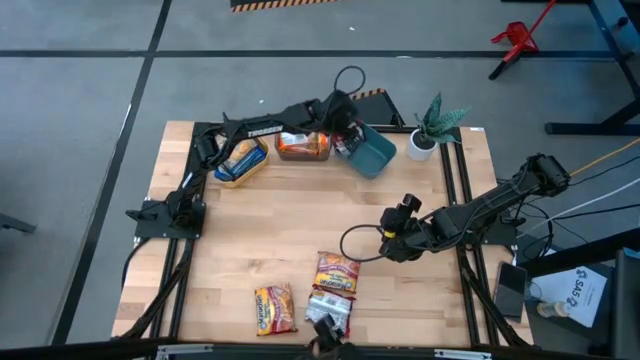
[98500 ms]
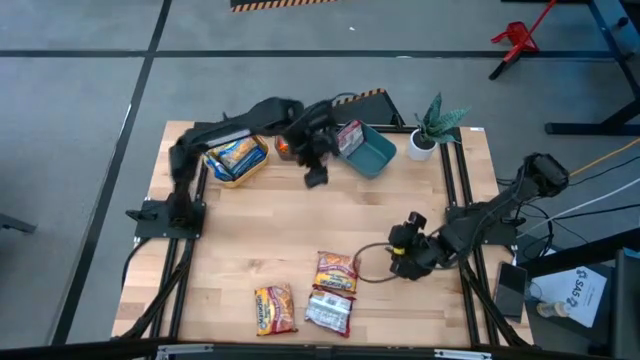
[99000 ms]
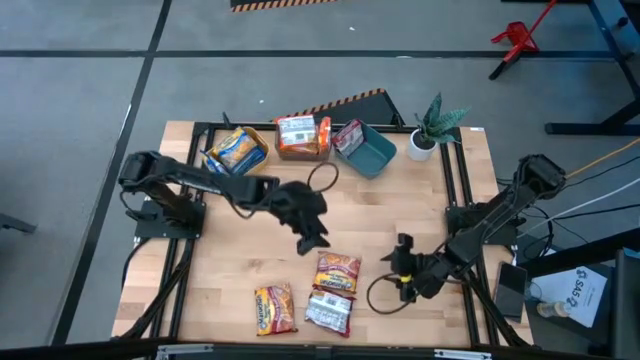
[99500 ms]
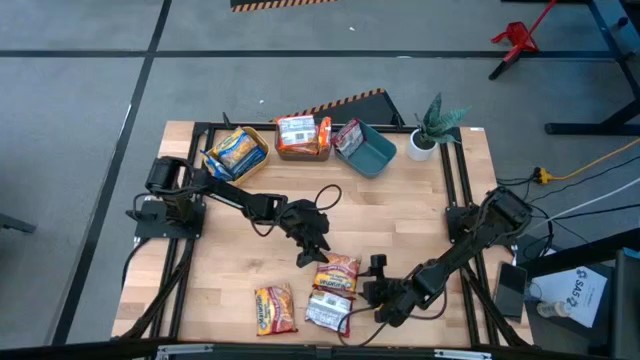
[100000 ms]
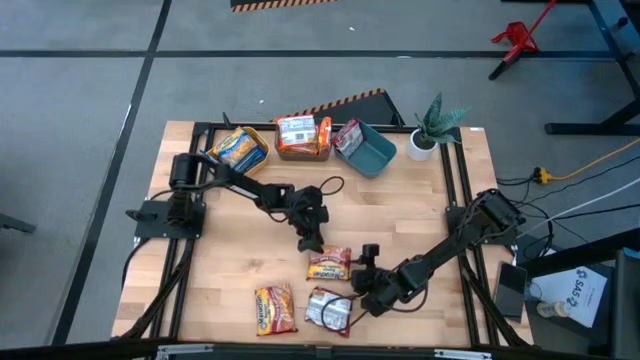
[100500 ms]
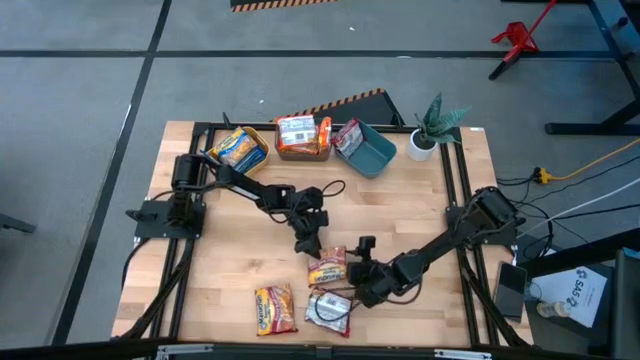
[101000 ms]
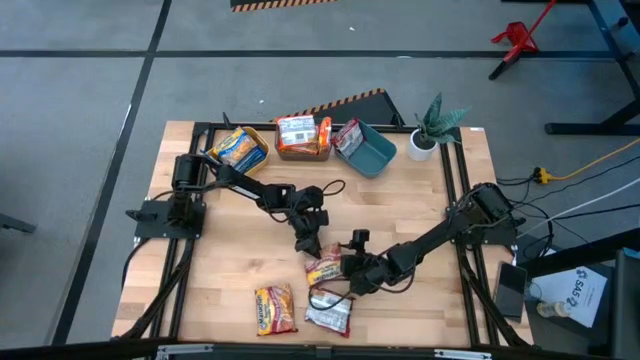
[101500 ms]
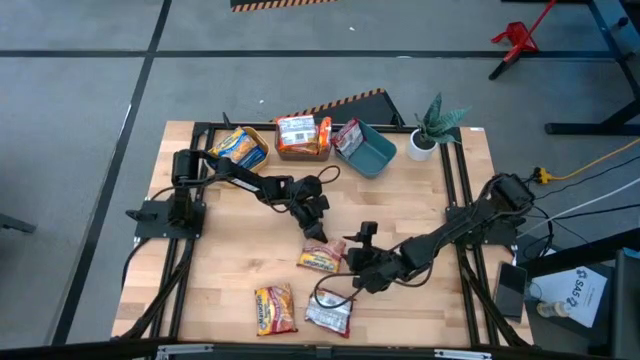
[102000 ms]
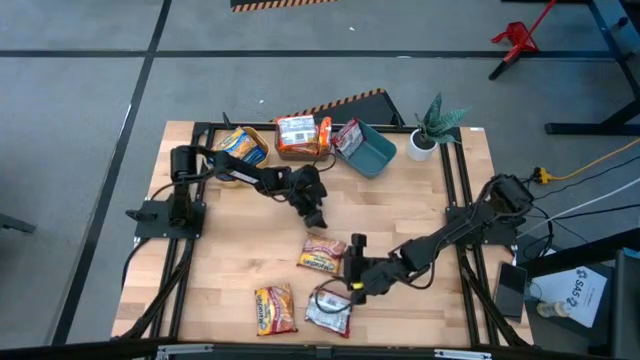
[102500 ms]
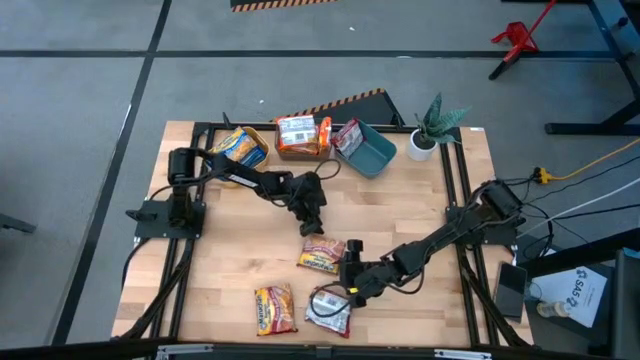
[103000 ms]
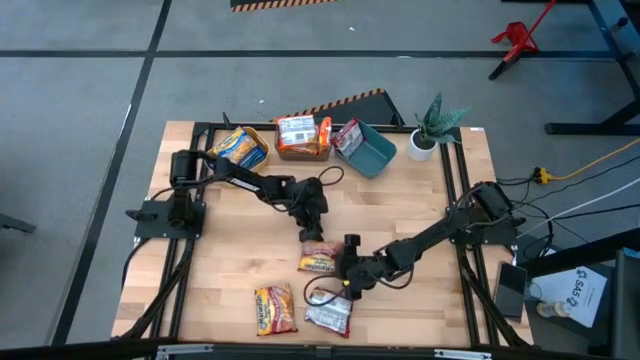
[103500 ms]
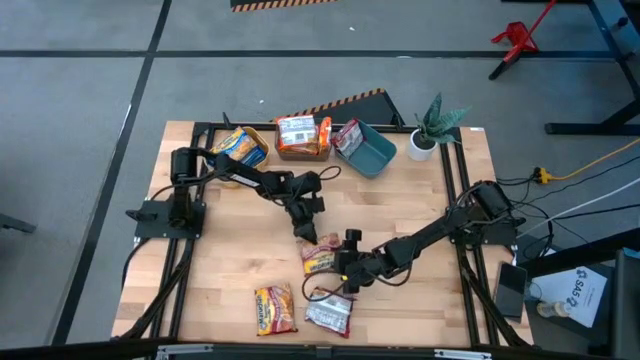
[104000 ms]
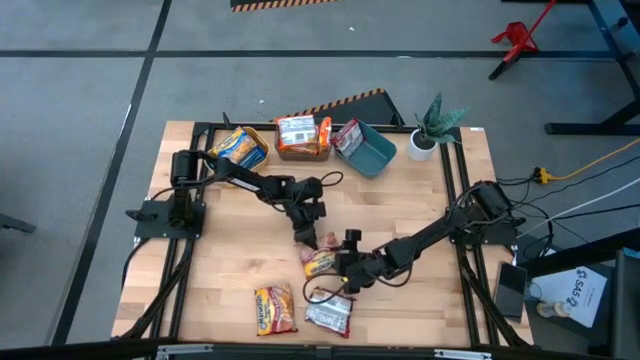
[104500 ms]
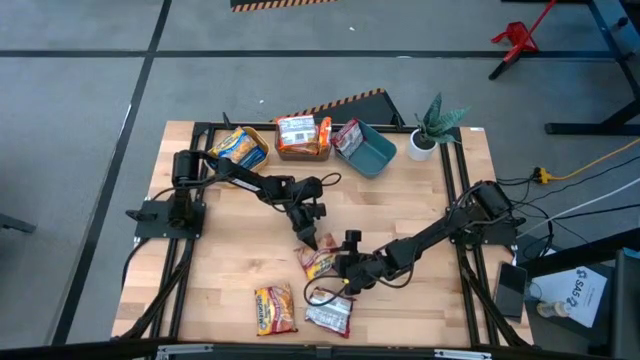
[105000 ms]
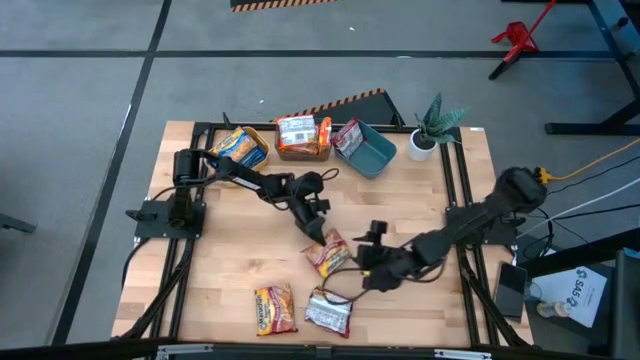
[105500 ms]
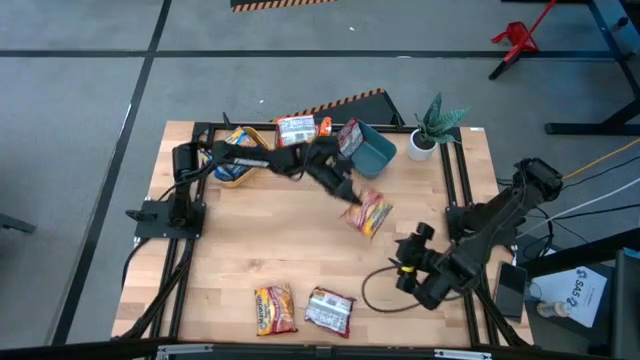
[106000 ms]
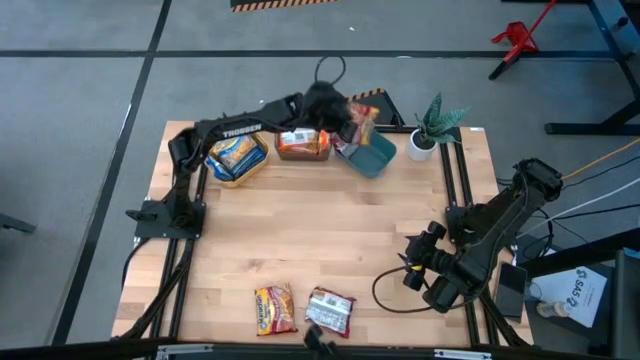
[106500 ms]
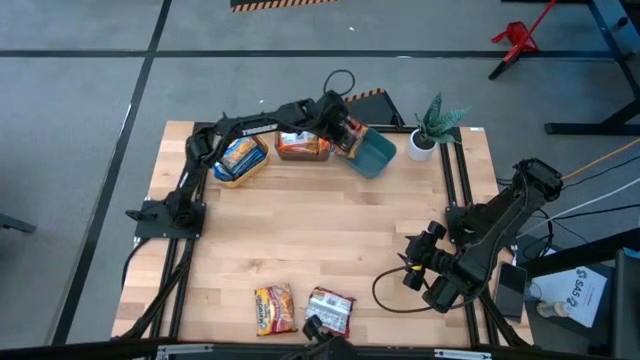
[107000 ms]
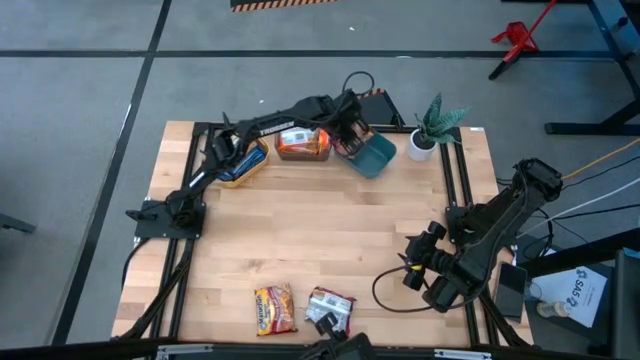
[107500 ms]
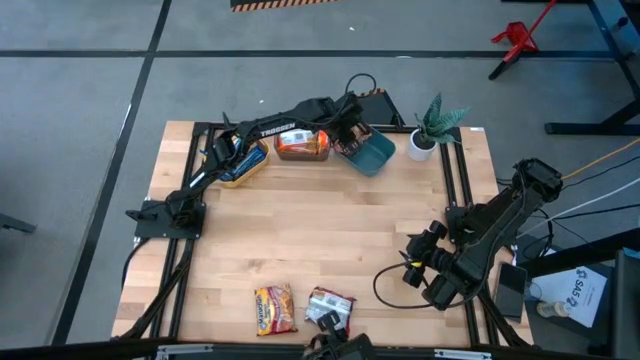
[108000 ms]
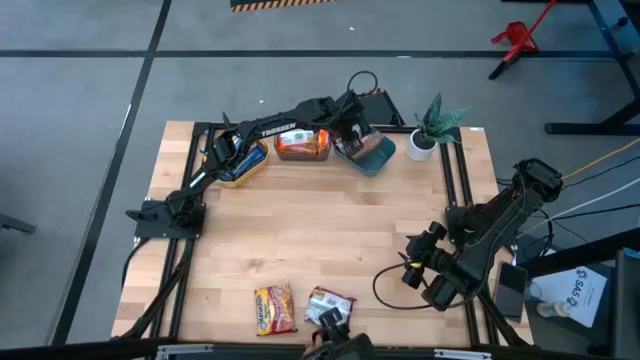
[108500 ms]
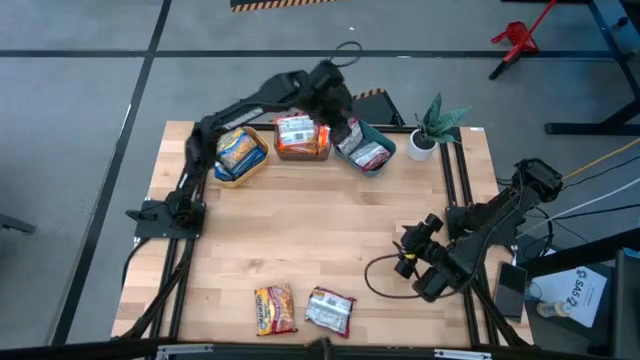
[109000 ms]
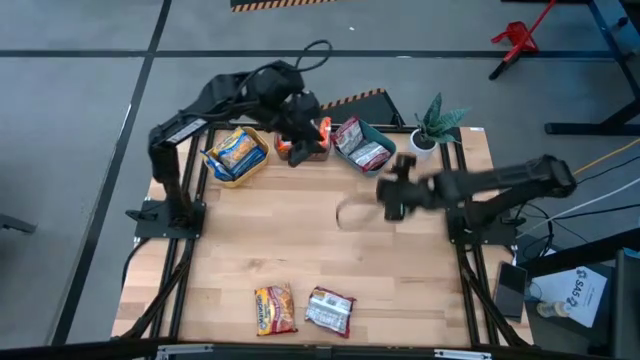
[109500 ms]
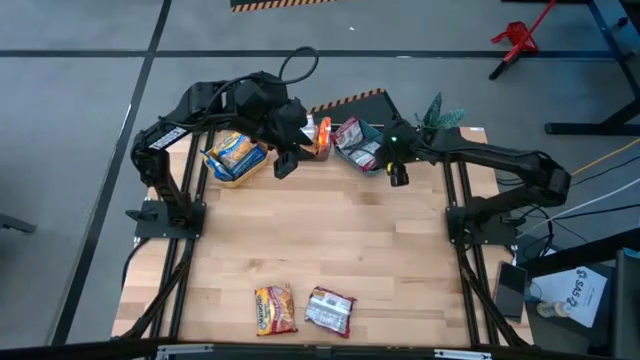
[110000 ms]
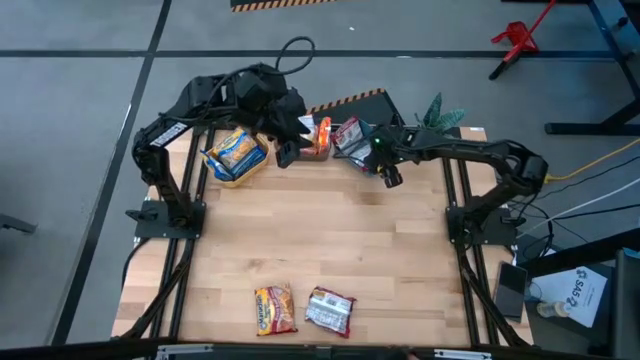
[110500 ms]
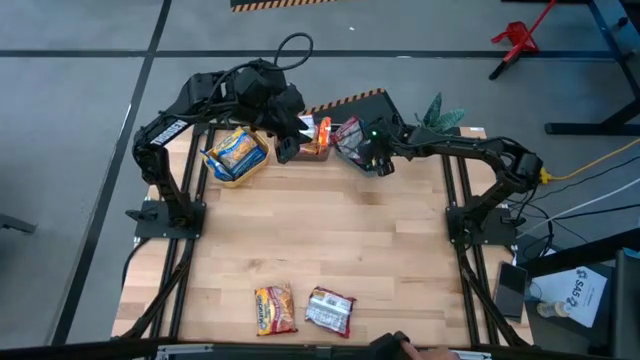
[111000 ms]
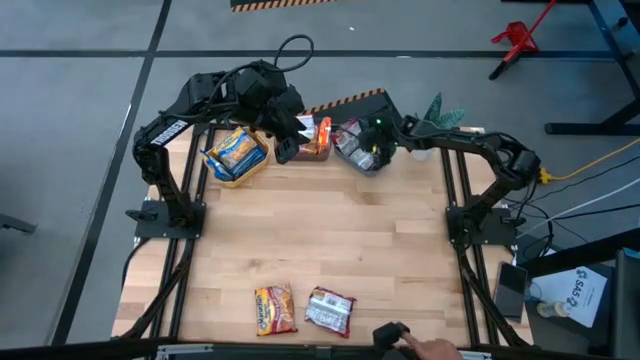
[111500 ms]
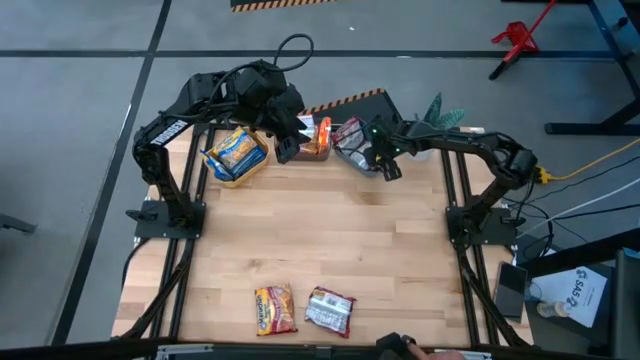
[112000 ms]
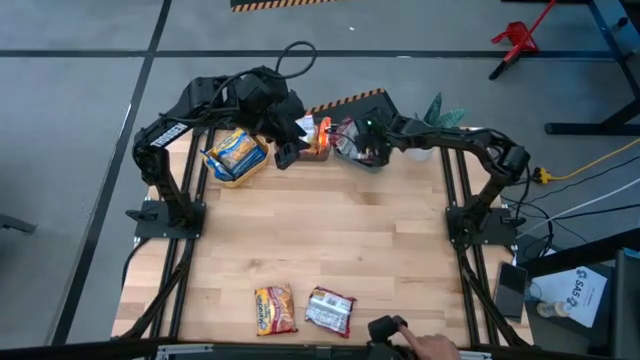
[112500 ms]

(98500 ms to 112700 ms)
Task: Sort Maruchan noodles
Put the red noodle pack into the blue bin

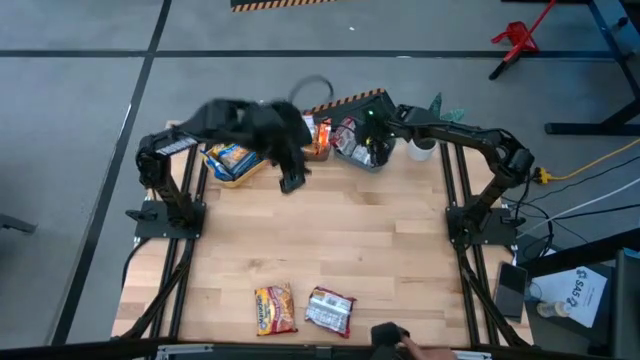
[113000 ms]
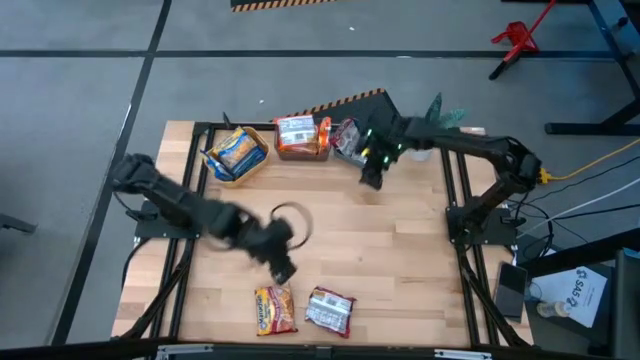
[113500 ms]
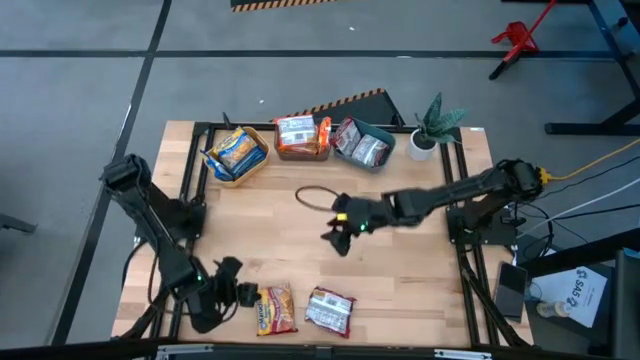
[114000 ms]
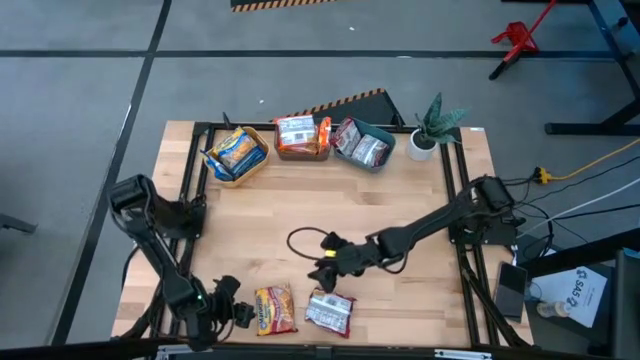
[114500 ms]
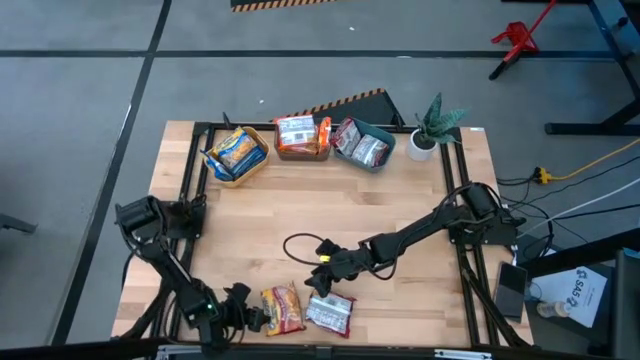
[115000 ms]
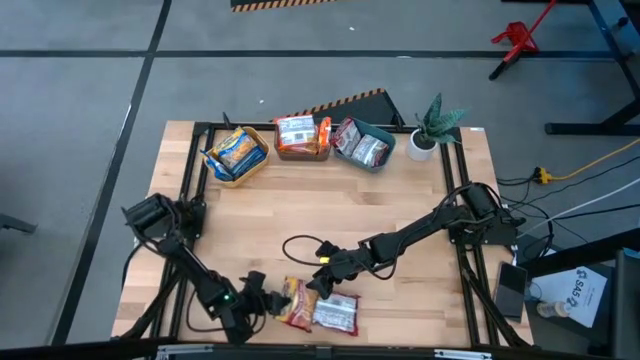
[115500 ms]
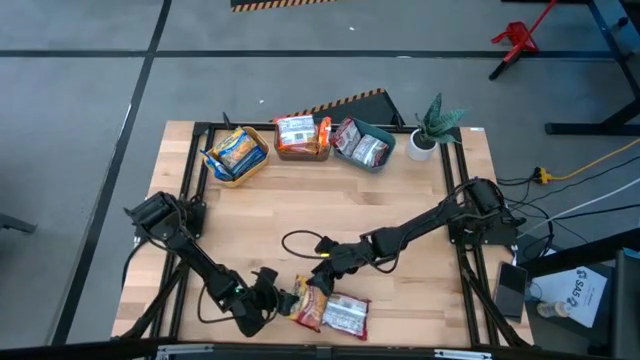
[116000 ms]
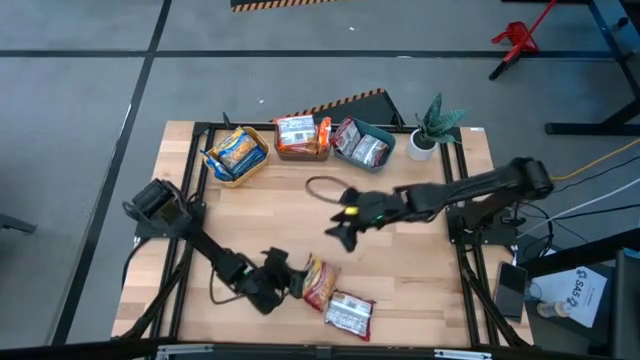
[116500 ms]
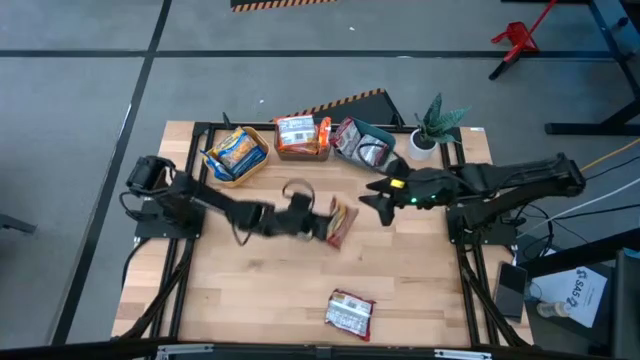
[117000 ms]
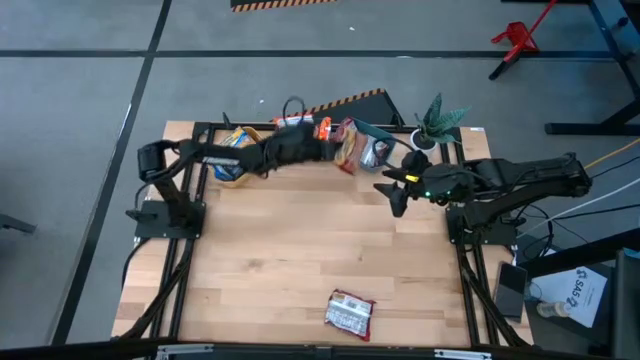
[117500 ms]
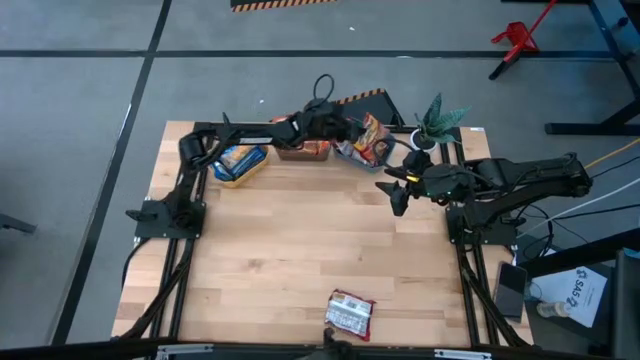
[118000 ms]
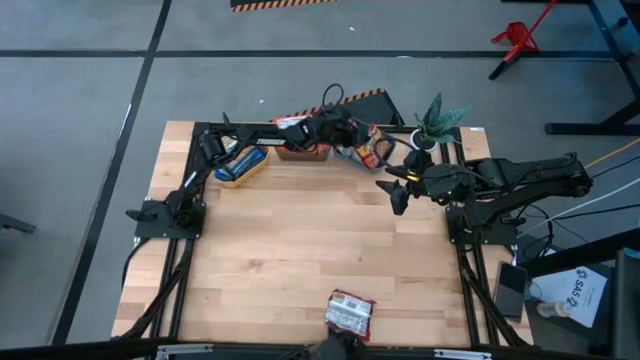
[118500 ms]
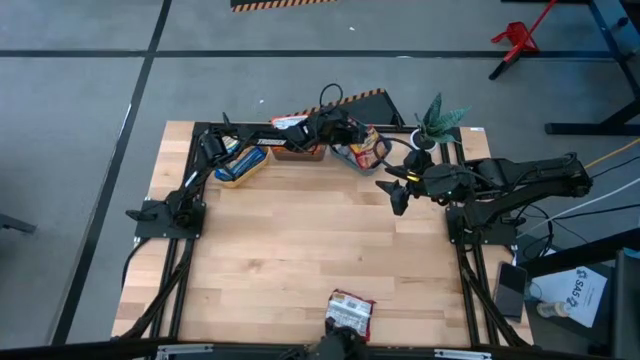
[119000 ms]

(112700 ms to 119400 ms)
Put the red noodle pack into the blue bin
